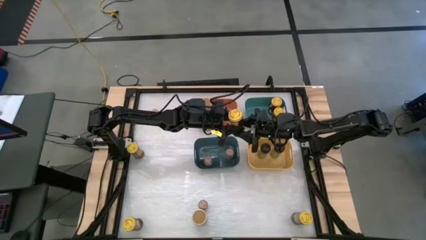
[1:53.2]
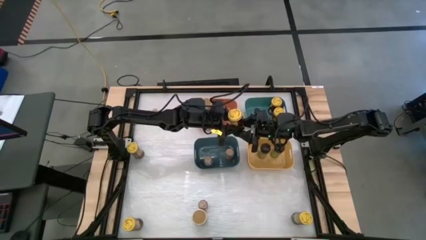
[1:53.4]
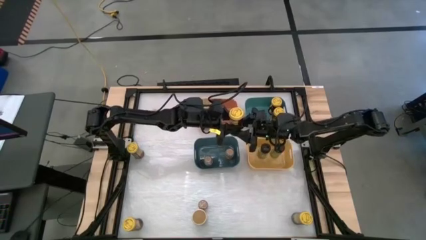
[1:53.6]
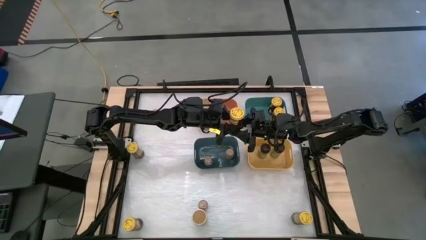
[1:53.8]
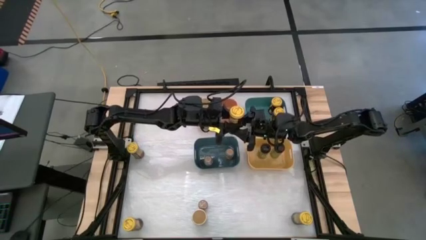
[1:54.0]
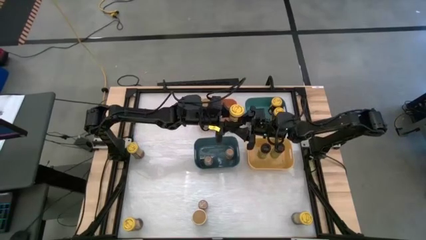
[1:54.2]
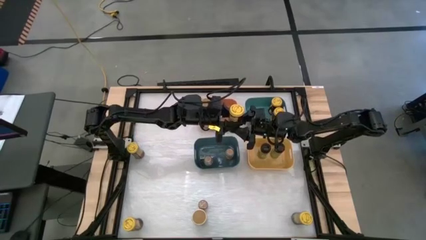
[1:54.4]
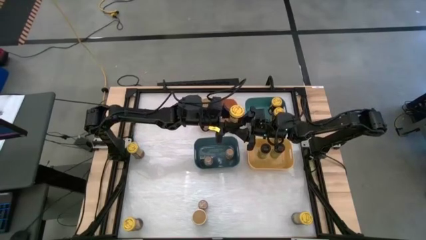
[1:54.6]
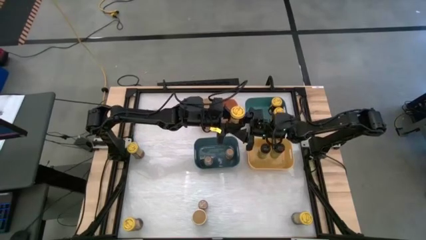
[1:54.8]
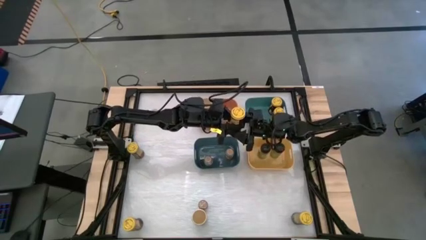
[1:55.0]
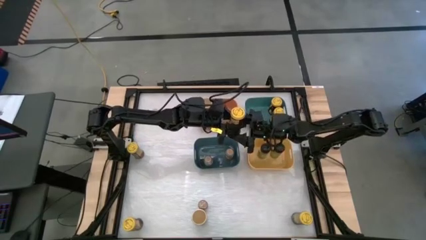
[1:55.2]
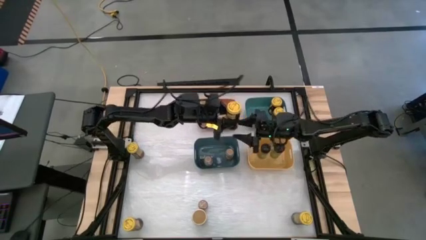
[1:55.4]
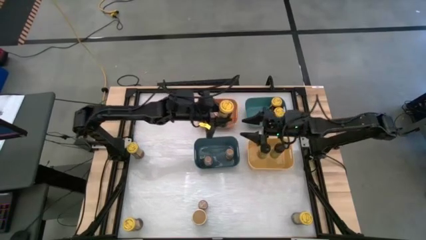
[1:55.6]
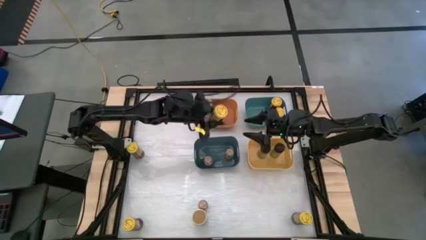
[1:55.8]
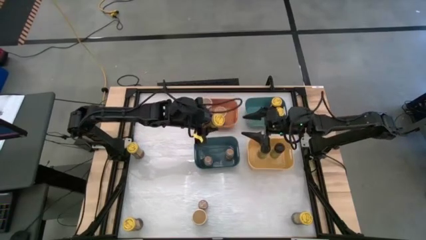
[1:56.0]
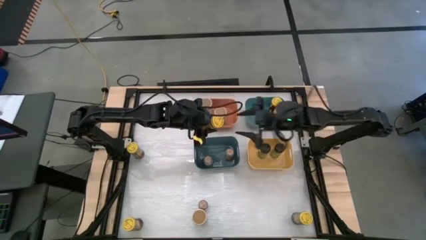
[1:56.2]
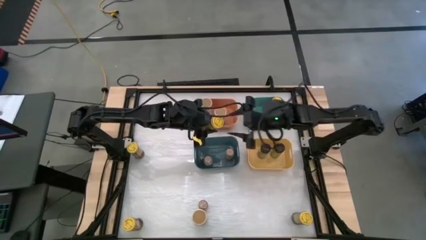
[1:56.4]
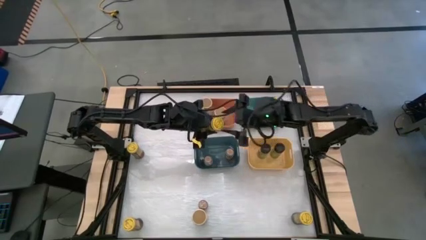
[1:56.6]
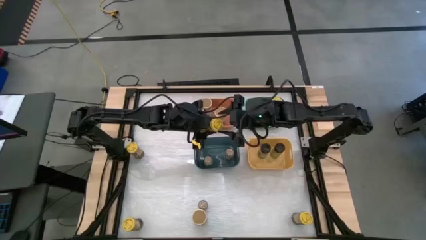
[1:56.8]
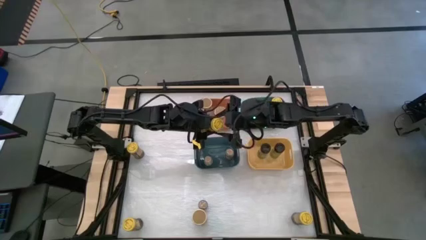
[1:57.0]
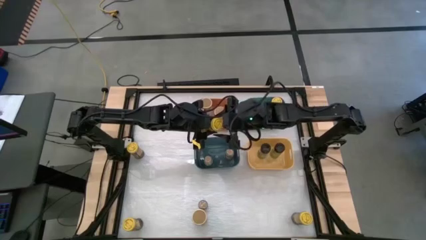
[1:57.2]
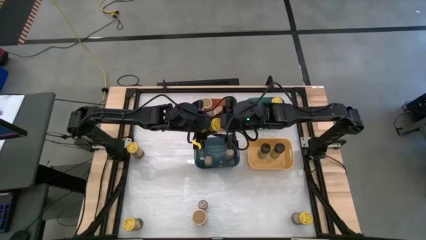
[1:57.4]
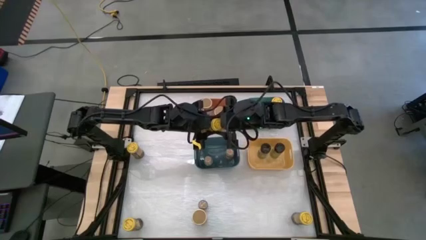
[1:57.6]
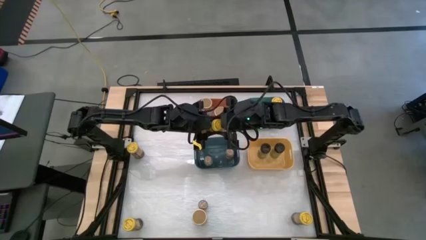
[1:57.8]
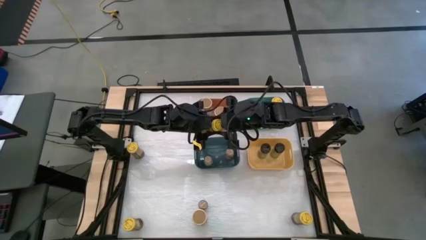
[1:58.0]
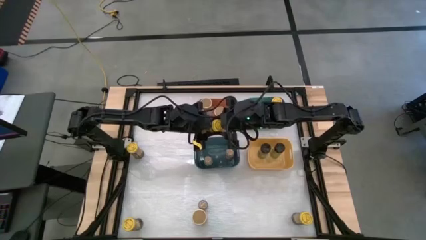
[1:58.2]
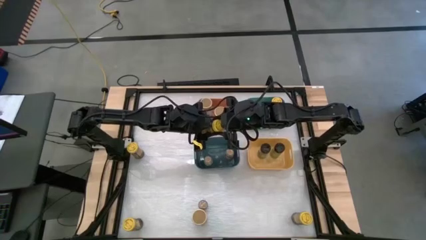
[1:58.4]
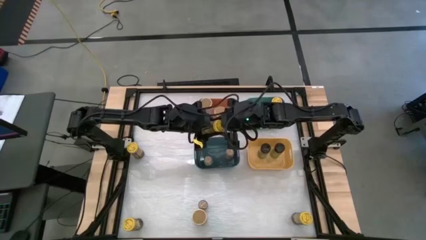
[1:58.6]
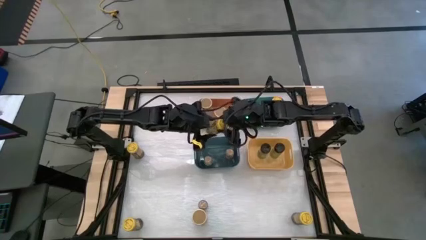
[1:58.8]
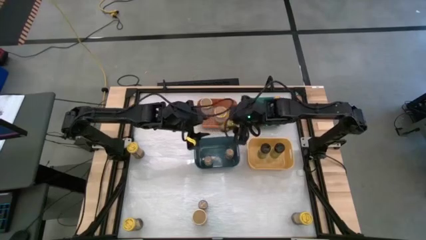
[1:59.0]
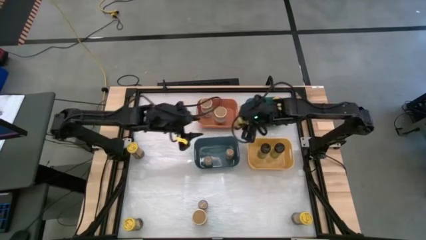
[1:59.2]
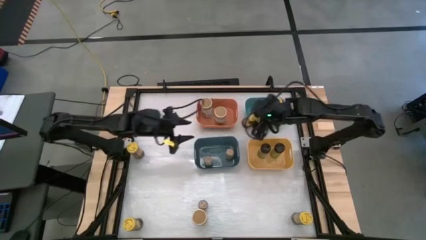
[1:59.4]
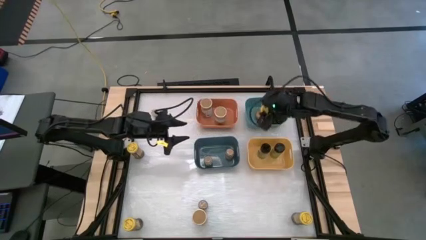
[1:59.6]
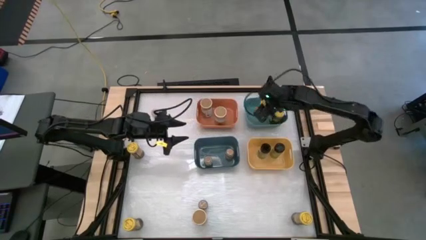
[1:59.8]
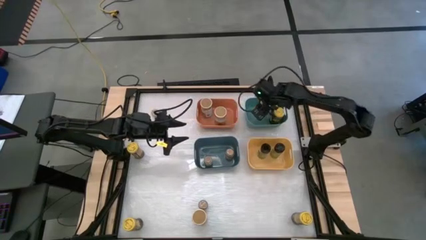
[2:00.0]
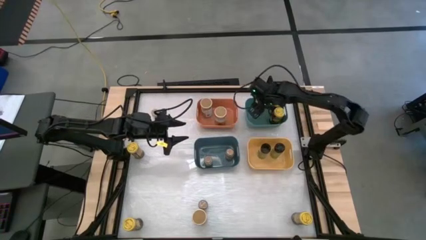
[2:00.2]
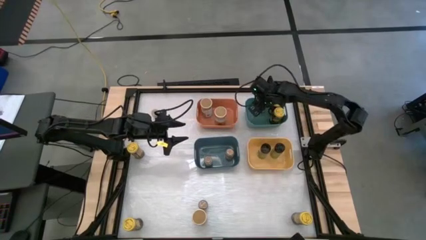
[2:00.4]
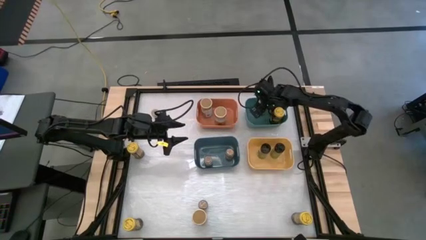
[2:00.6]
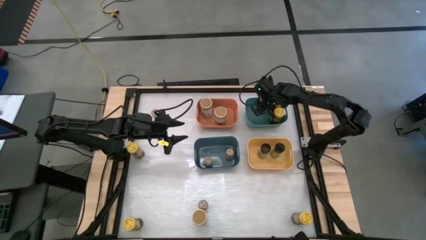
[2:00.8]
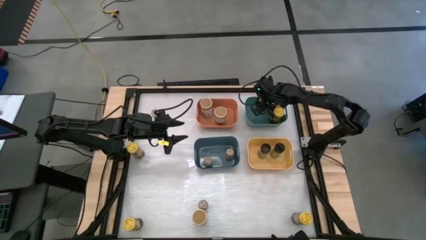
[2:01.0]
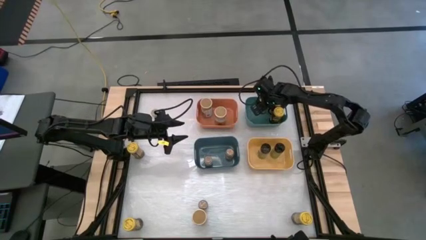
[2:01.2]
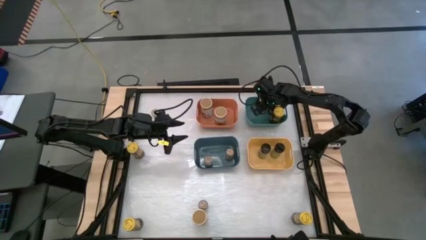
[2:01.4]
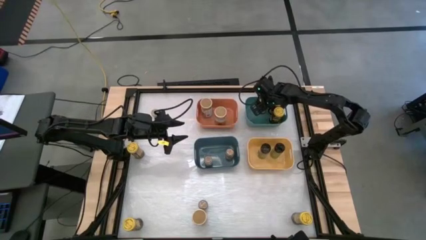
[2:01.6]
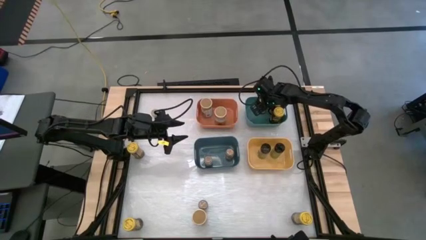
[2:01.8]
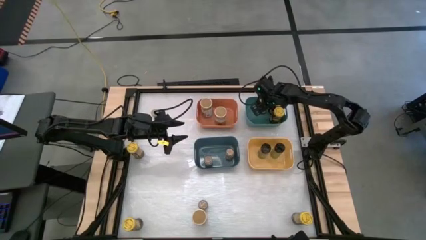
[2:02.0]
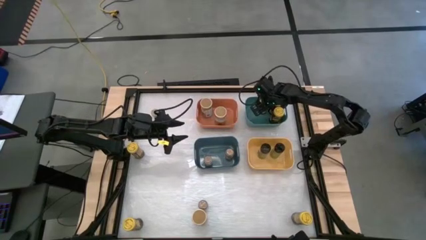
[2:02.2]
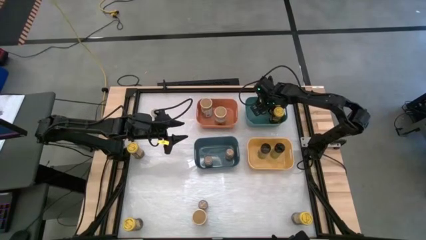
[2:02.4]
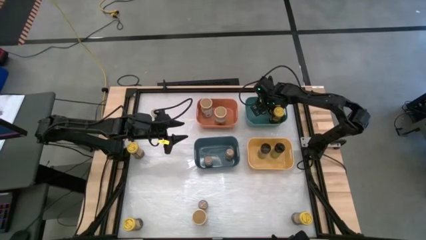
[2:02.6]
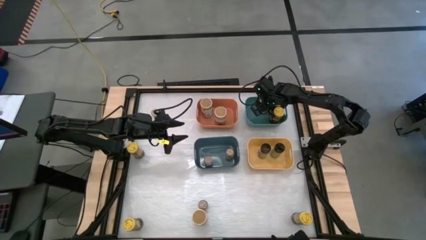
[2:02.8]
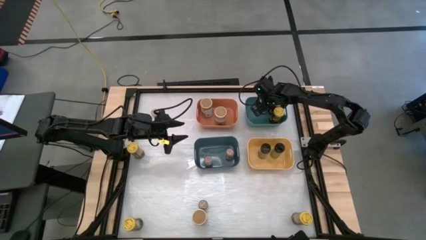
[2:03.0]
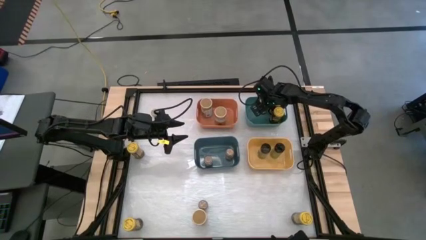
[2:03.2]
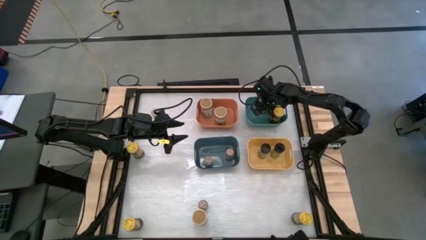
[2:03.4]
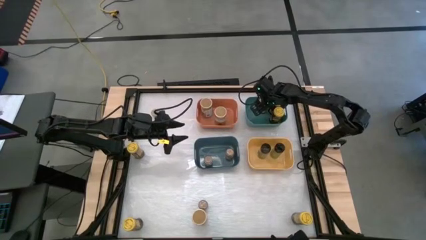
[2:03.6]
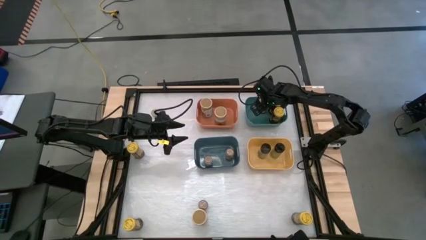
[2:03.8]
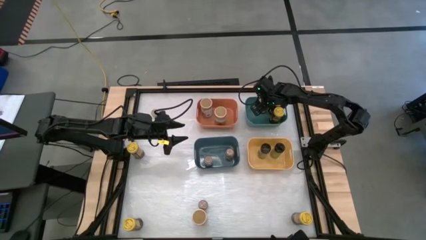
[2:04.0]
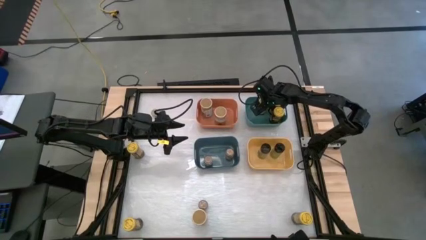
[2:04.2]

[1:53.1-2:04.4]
Task: Sort spices by type
Put the yellow spice bottle into the green bin

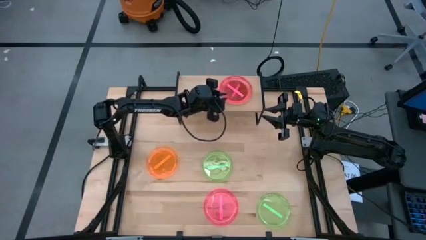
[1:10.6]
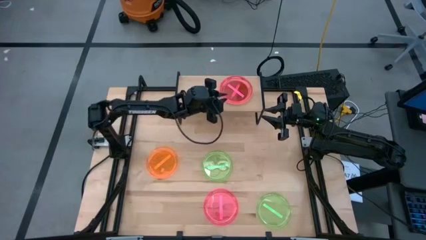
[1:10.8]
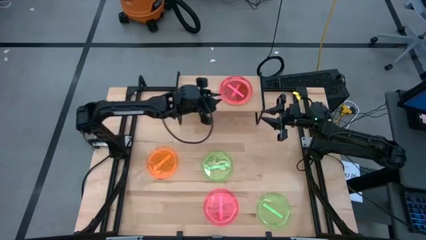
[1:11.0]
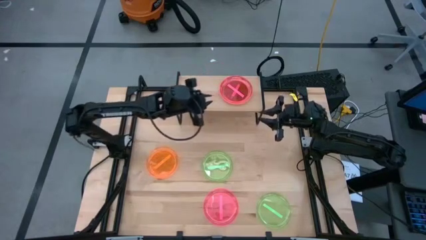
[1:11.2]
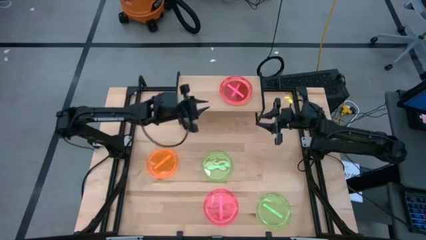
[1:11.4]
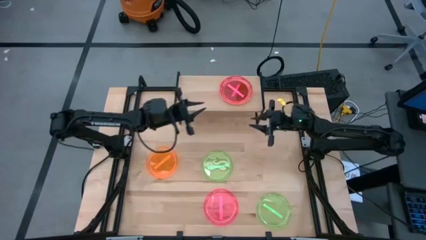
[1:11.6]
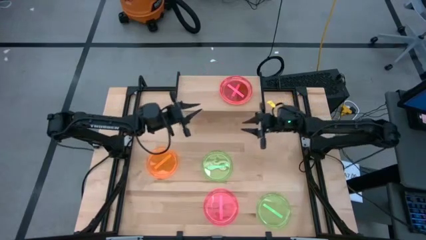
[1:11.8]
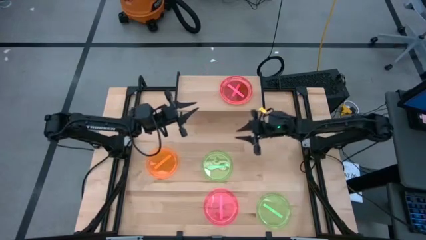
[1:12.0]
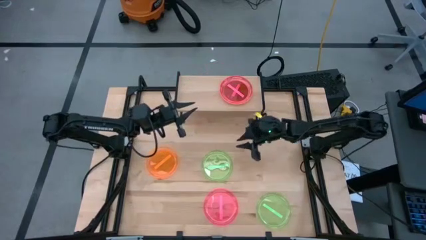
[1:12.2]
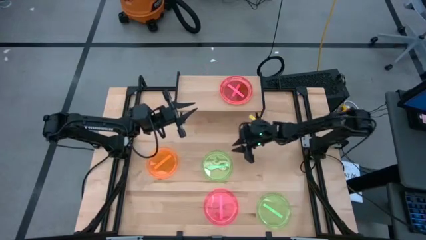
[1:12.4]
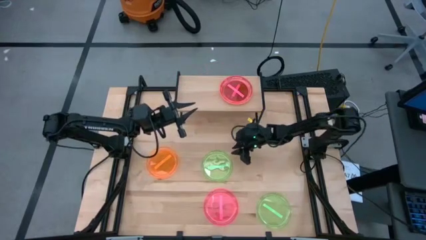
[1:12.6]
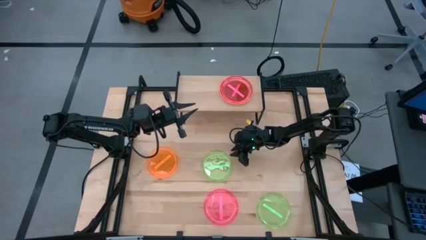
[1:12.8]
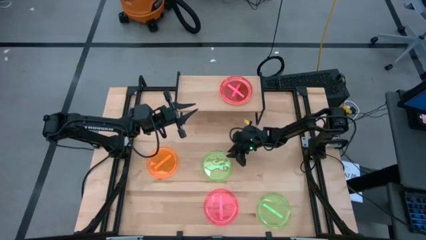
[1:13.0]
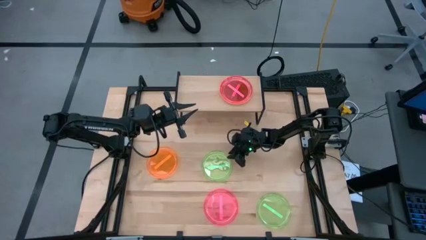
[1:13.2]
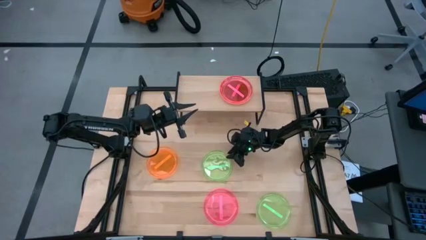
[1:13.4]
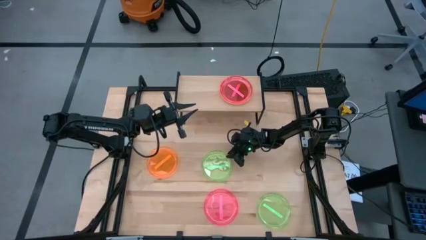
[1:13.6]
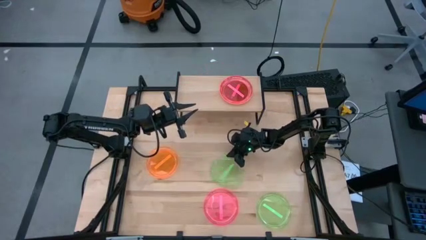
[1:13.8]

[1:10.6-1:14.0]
Task: Place and stack plates onto a shelf
Put the green plate on the shelf
